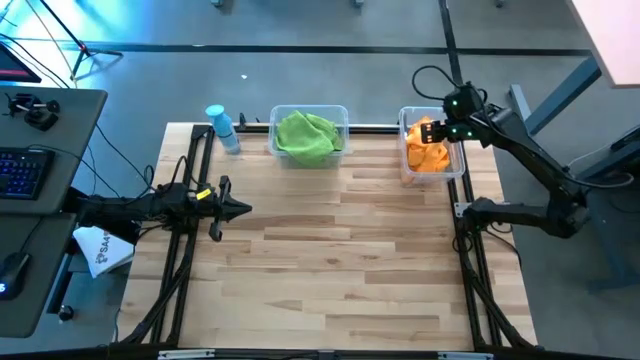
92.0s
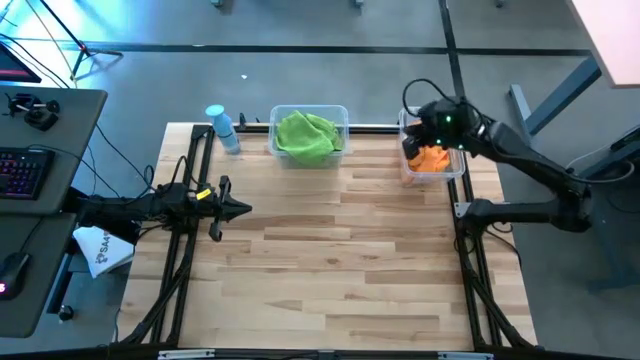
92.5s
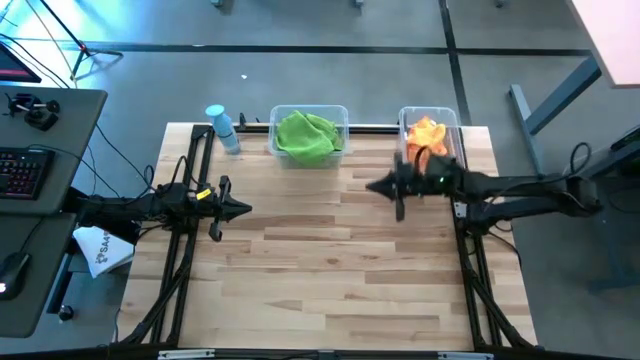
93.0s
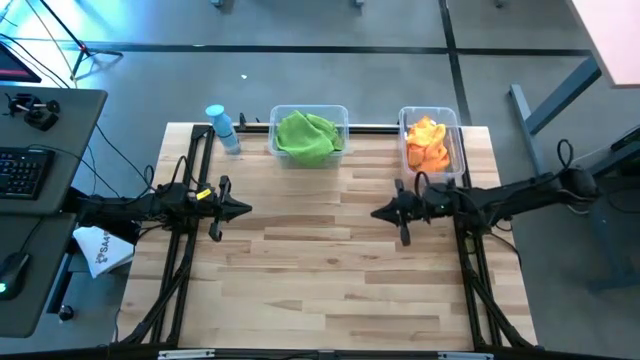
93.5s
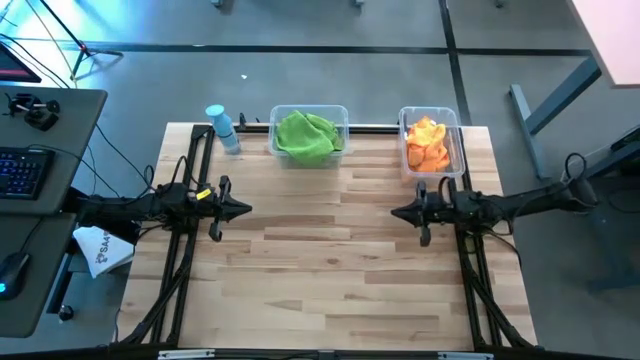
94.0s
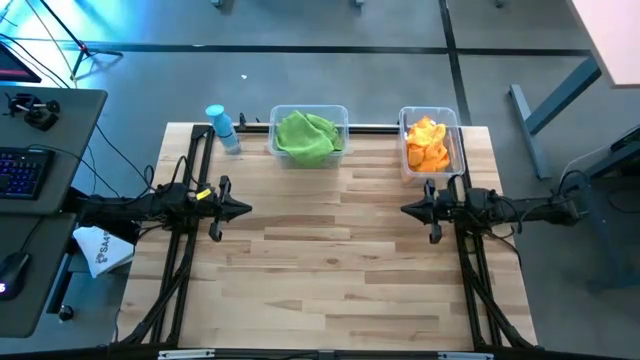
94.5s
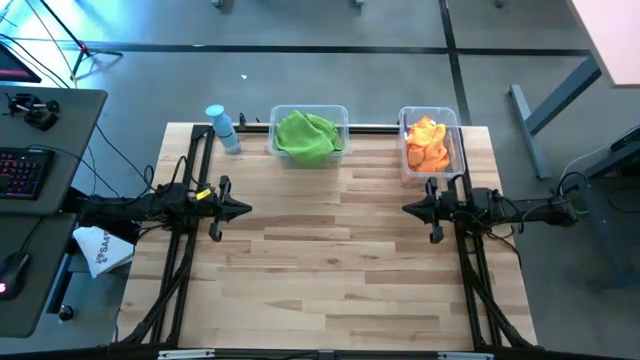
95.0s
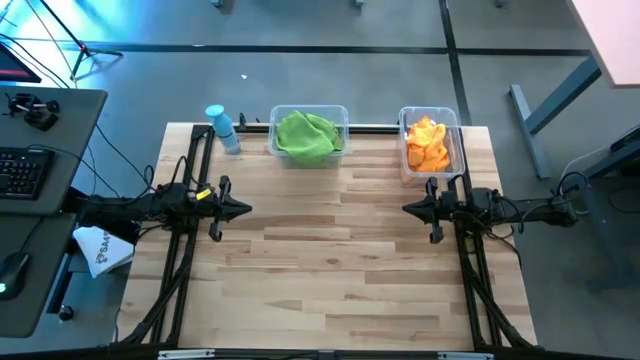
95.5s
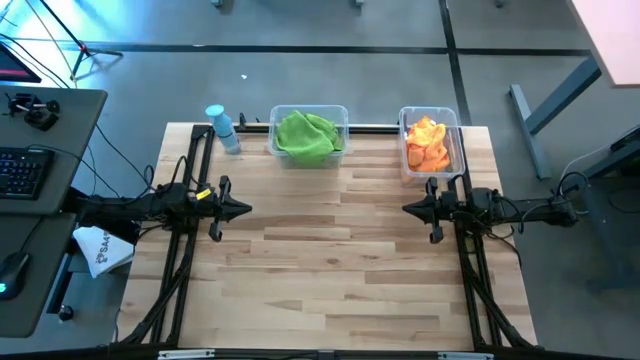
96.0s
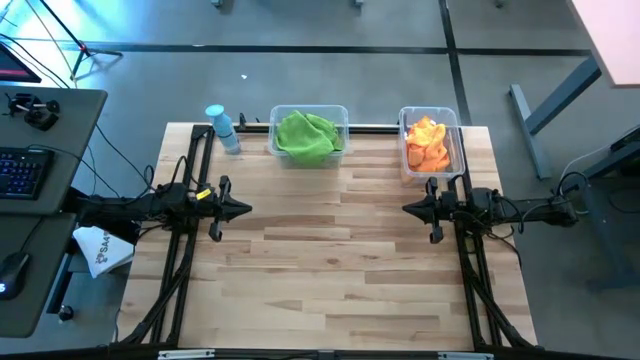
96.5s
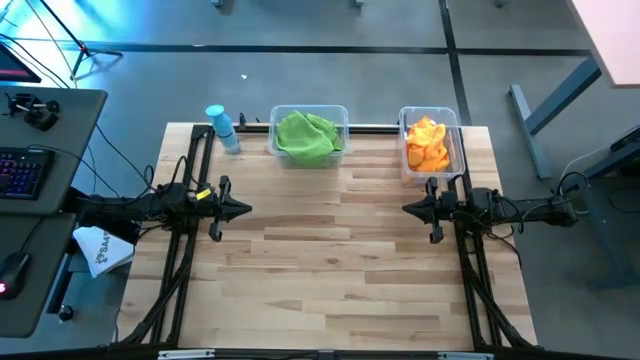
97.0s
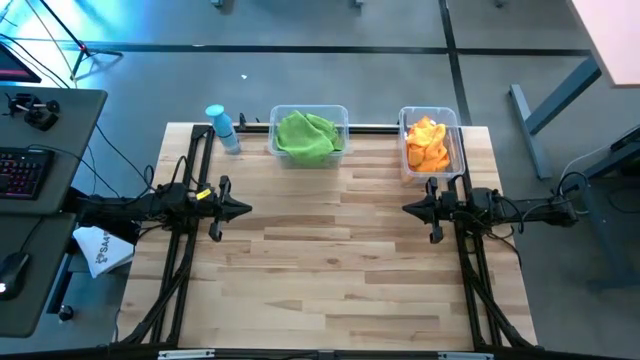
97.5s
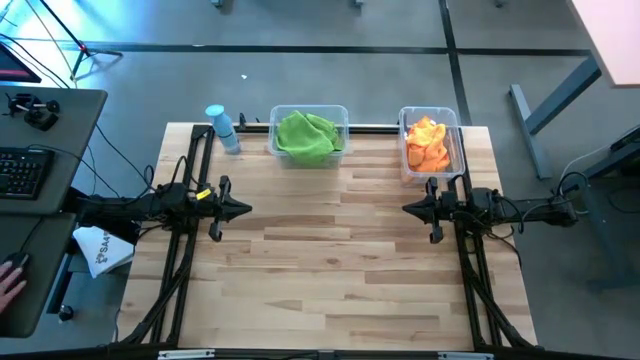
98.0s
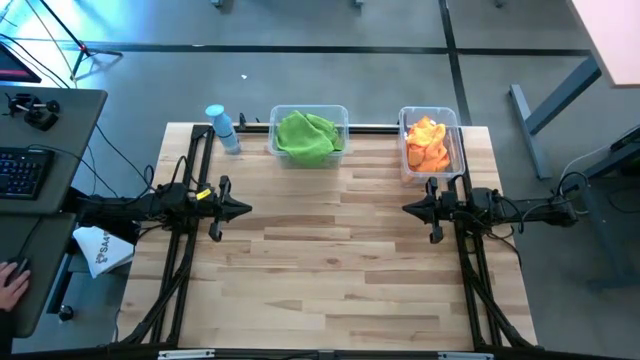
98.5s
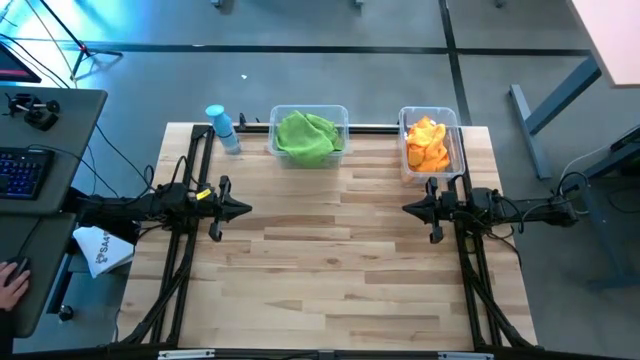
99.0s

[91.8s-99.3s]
Task: Sort microfiber towel by color & place in baskets
Return to Home Position

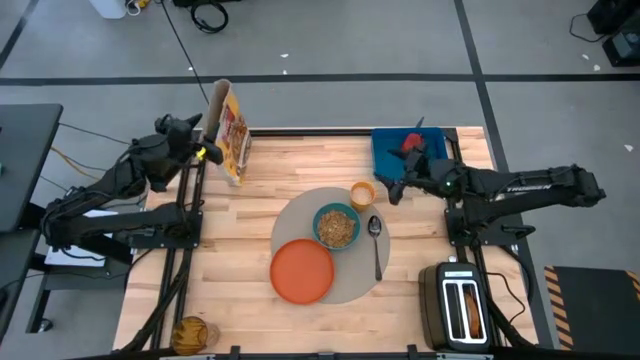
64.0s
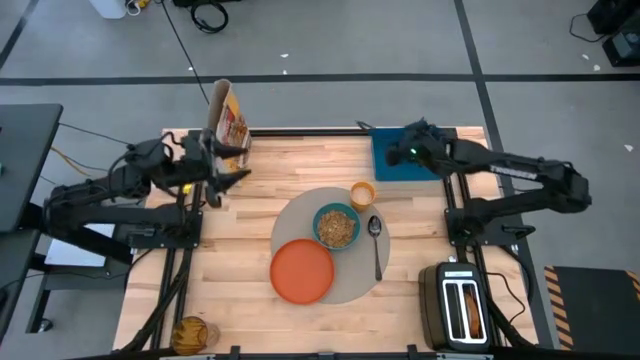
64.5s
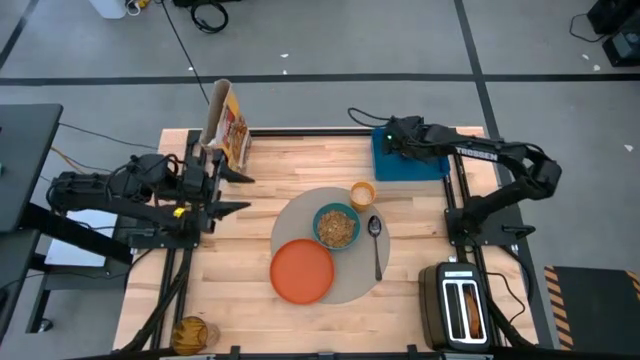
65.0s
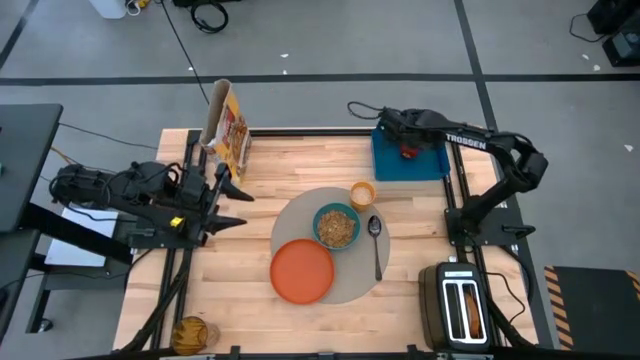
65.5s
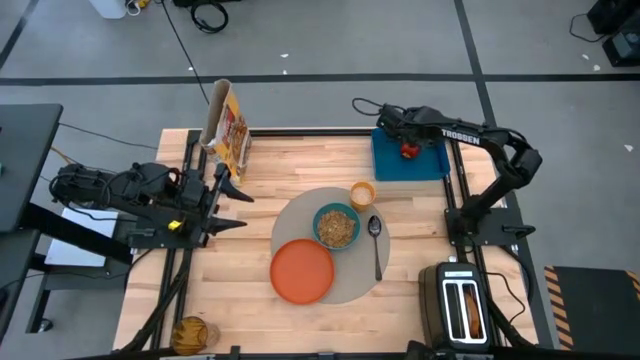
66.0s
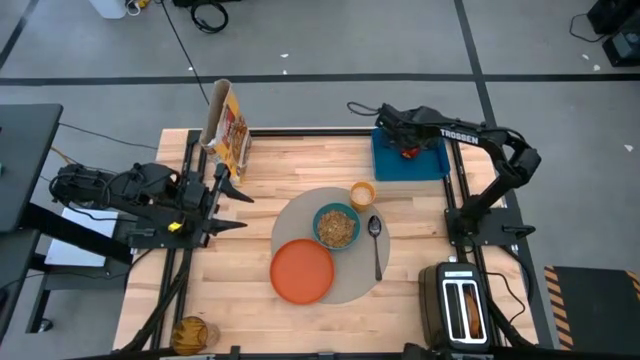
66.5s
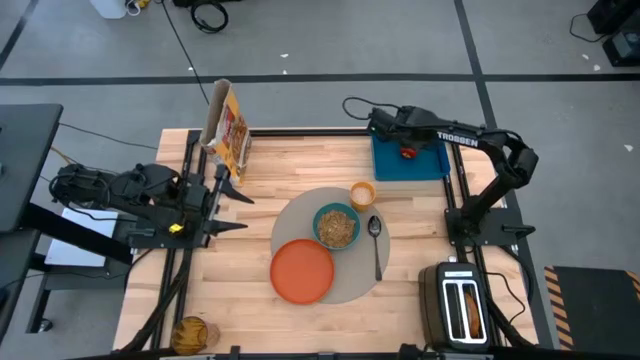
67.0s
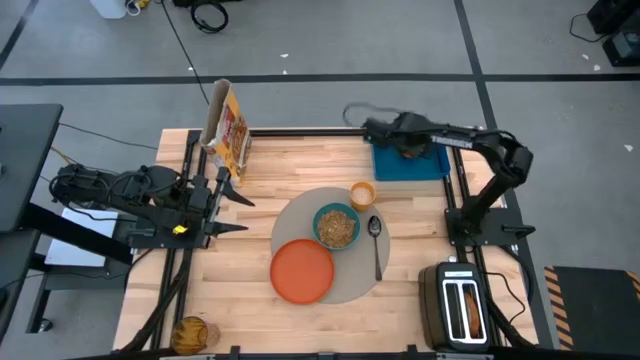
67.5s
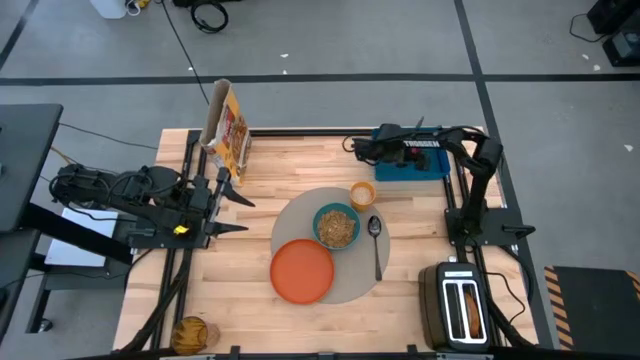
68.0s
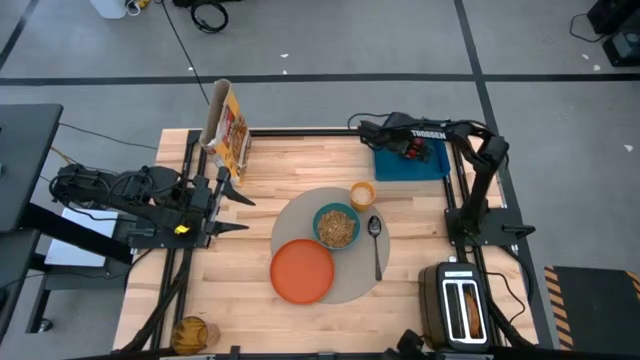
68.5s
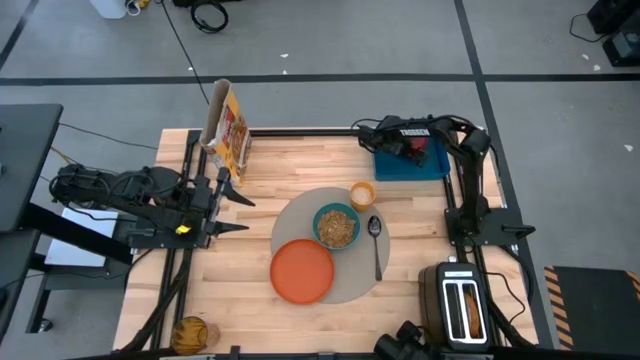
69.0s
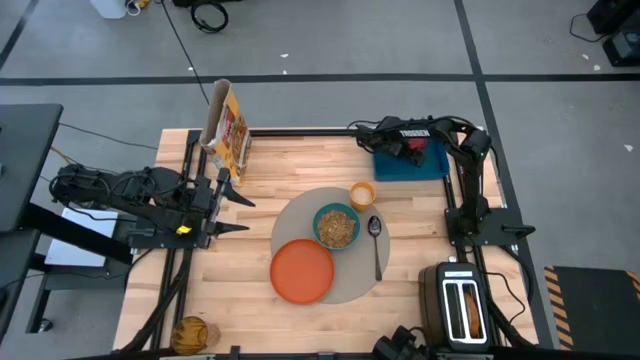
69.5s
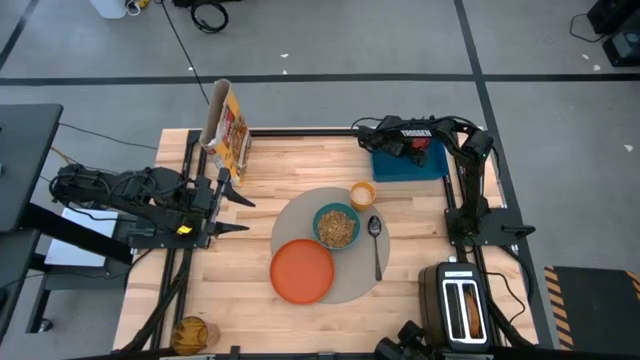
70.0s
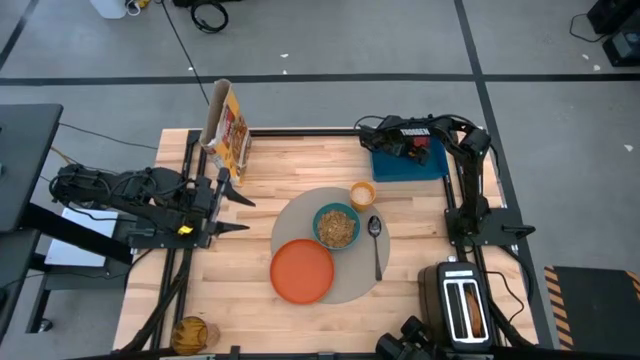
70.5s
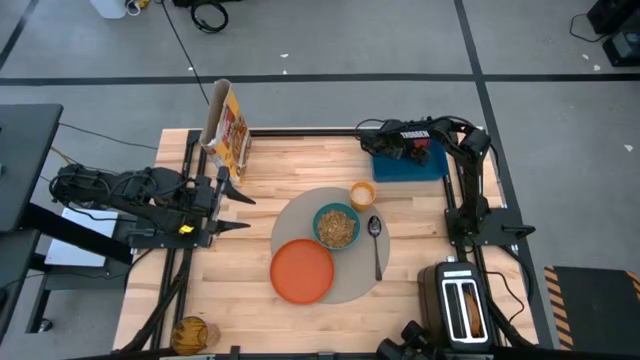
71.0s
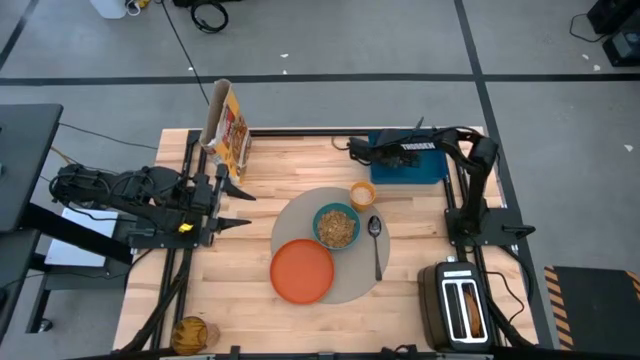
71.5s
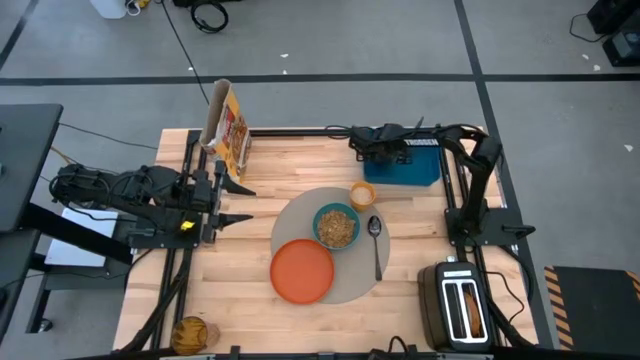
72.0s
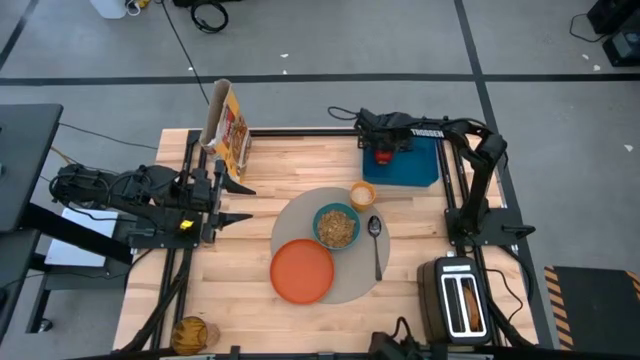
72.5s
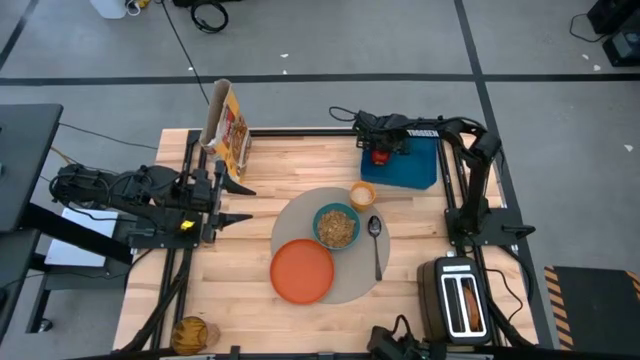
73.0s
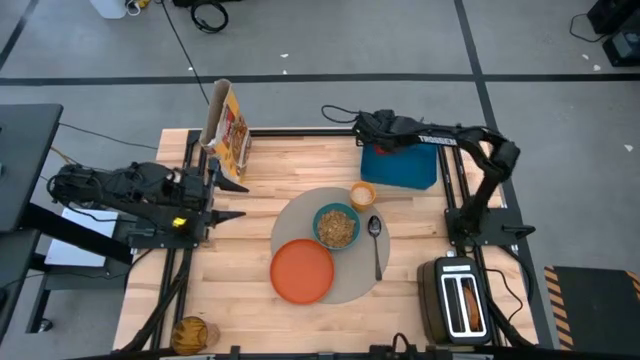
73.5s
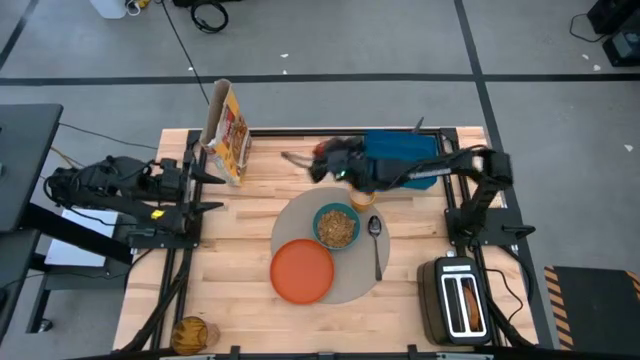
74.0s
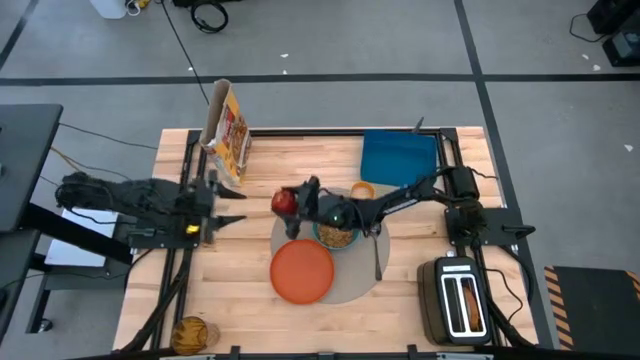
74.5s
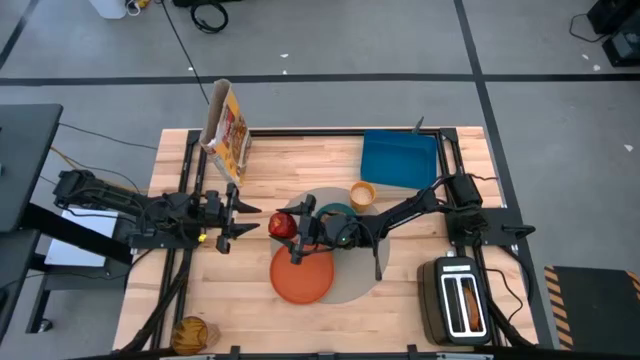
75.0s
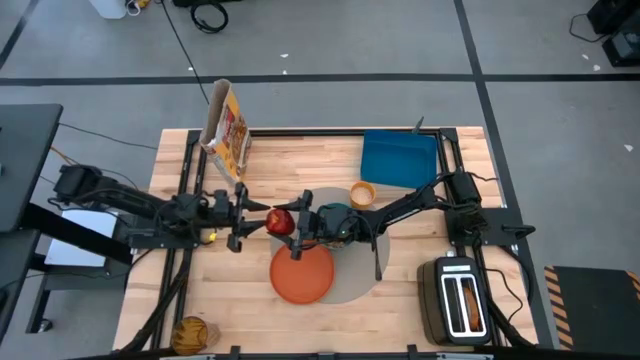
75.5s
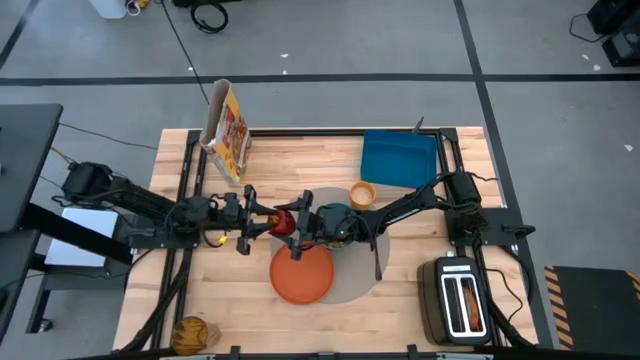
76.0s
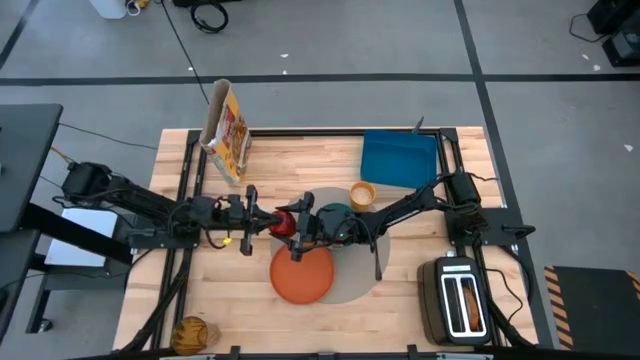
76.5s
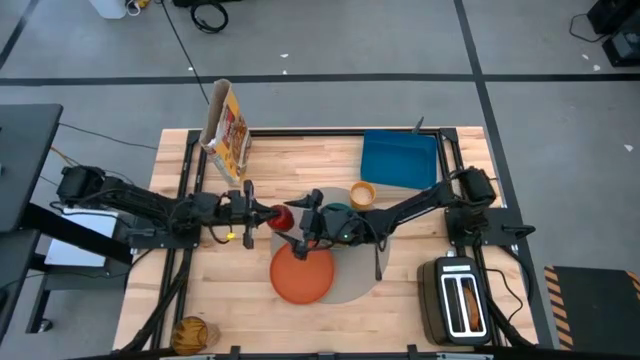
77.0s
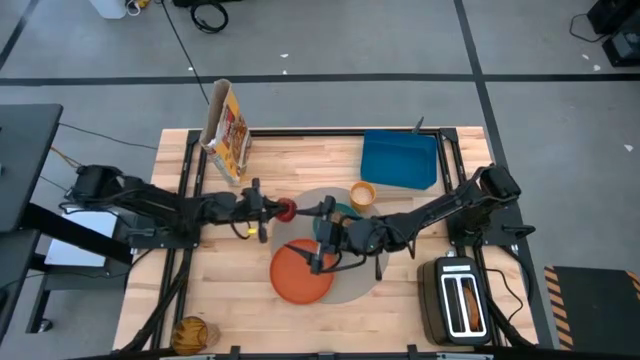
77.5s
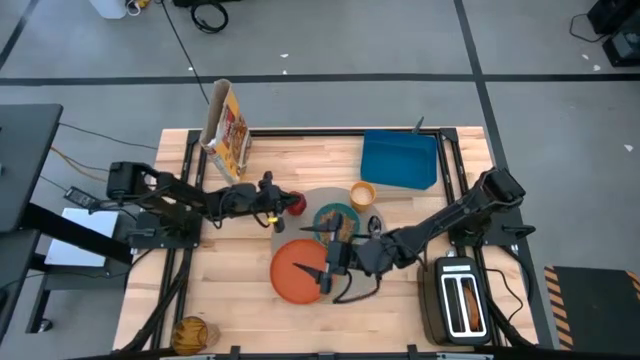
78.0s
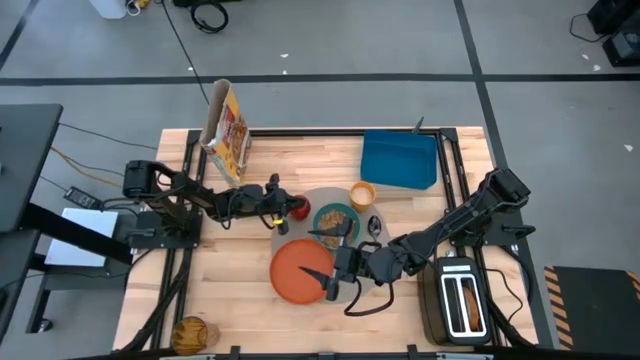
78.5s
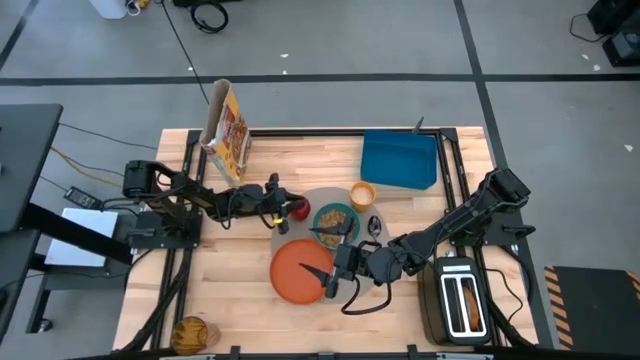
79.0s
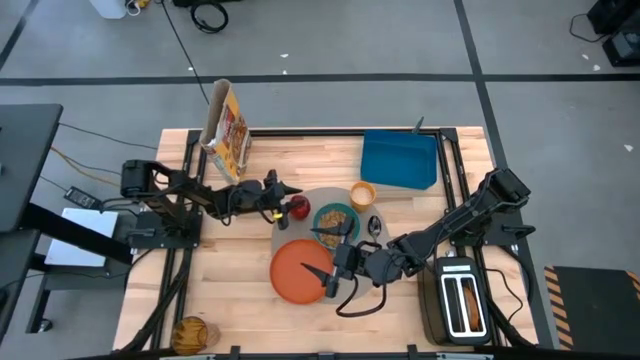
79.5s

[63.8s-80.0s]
Task: Arrange a breakfast setting
Put the apple on the mat to the top left of the bowl
